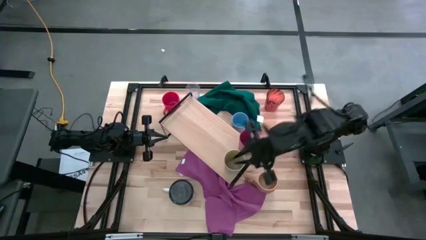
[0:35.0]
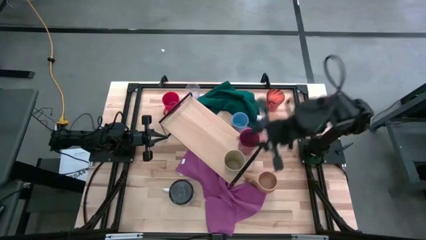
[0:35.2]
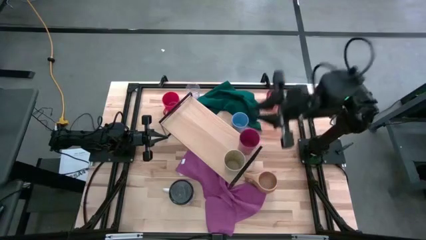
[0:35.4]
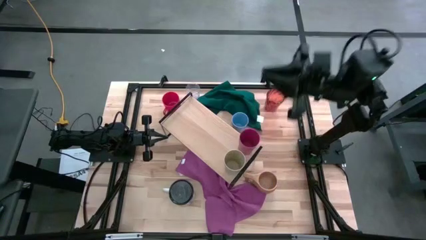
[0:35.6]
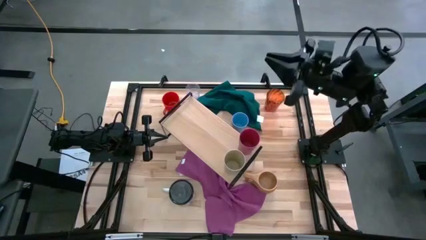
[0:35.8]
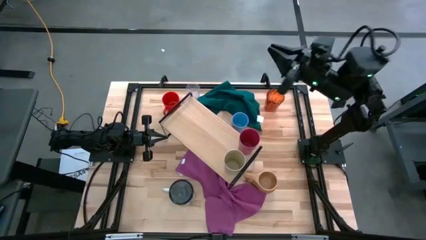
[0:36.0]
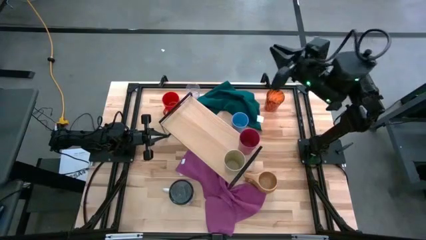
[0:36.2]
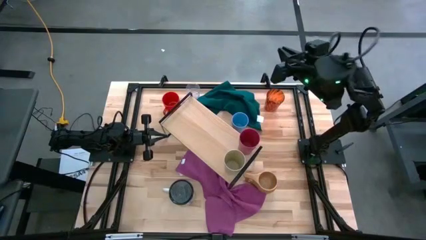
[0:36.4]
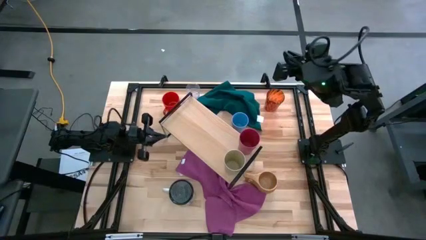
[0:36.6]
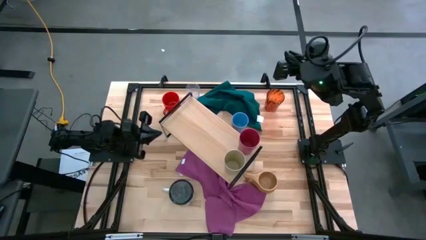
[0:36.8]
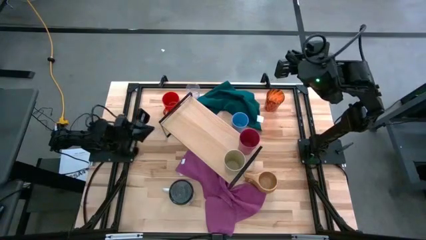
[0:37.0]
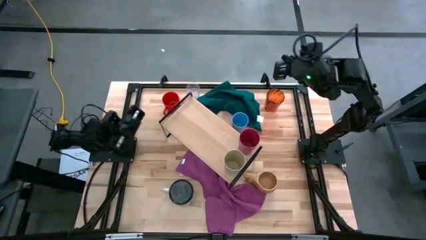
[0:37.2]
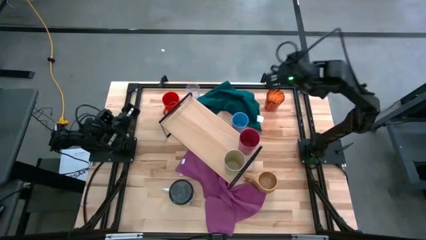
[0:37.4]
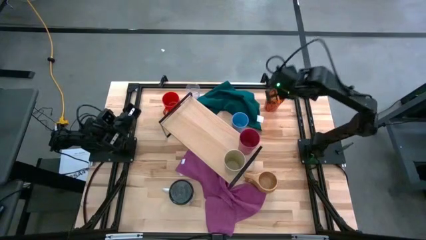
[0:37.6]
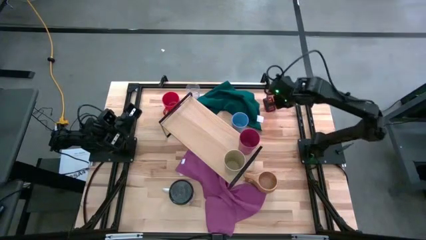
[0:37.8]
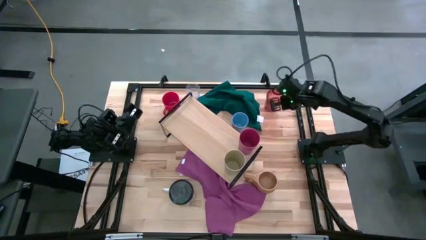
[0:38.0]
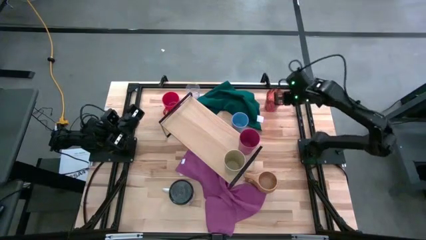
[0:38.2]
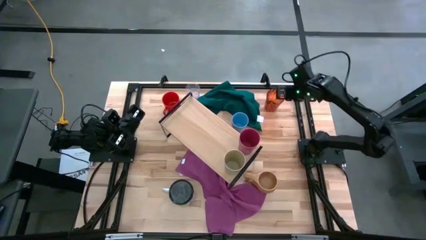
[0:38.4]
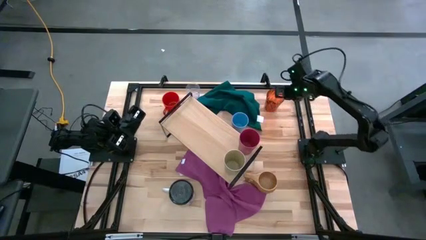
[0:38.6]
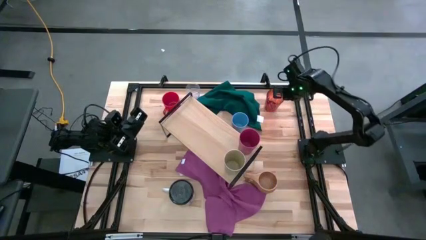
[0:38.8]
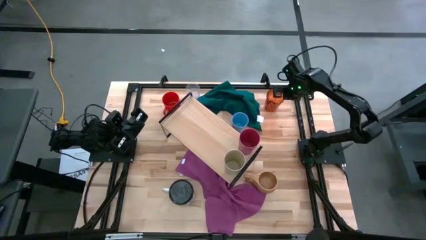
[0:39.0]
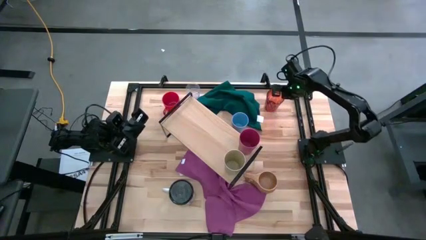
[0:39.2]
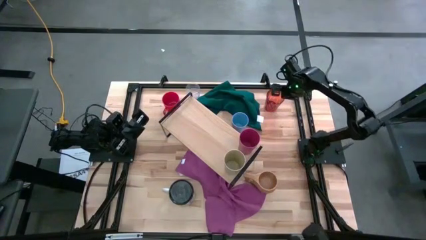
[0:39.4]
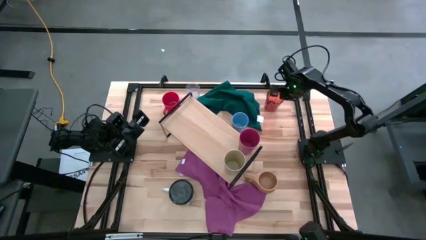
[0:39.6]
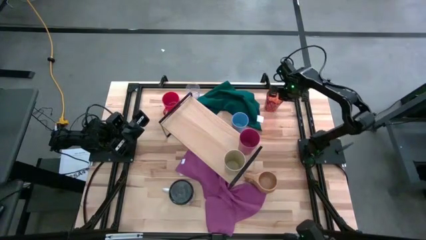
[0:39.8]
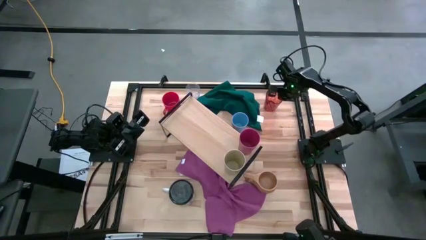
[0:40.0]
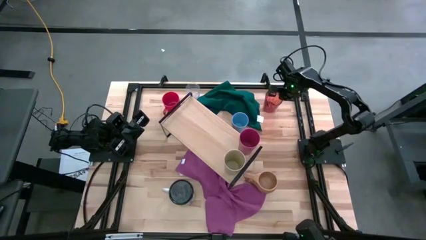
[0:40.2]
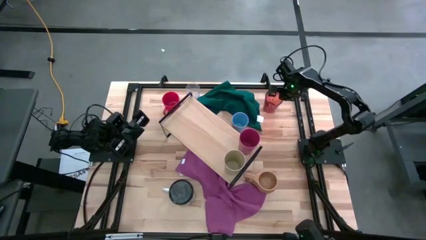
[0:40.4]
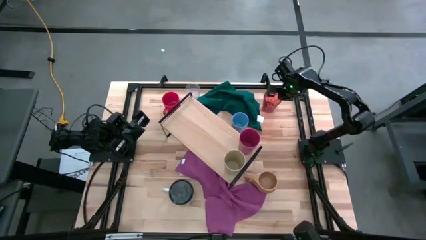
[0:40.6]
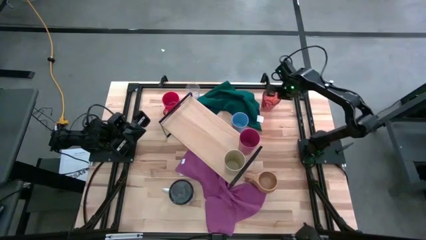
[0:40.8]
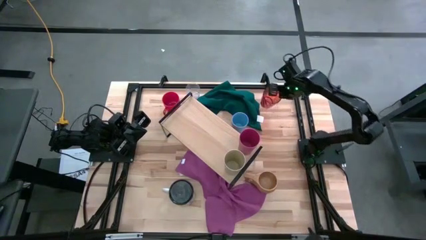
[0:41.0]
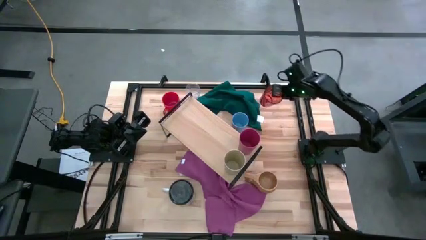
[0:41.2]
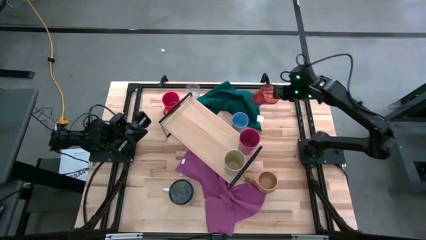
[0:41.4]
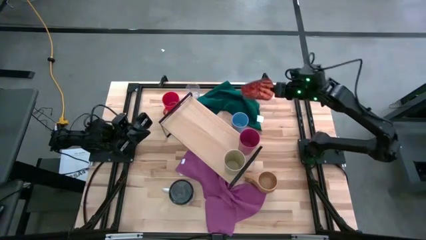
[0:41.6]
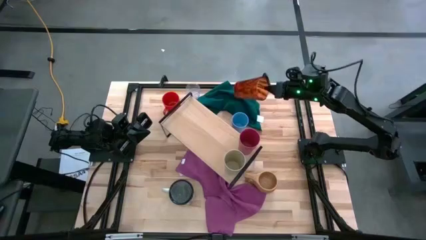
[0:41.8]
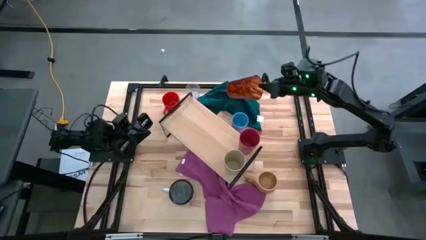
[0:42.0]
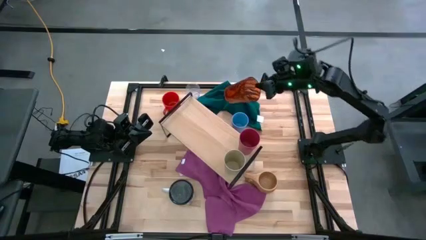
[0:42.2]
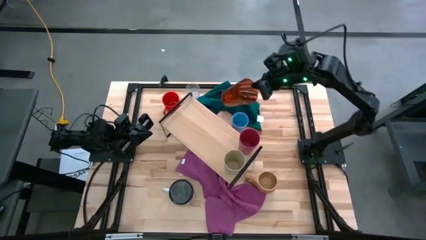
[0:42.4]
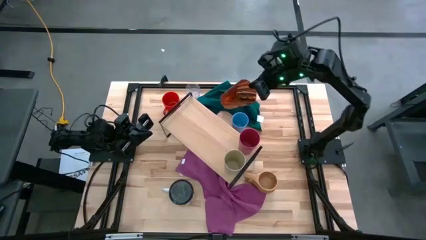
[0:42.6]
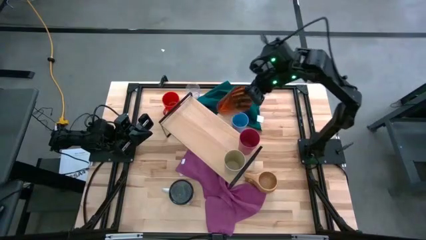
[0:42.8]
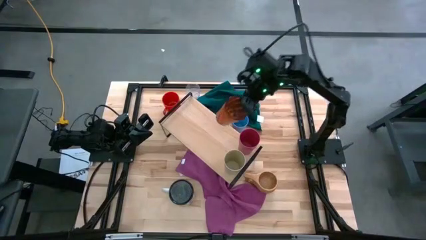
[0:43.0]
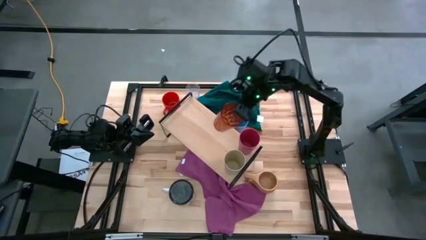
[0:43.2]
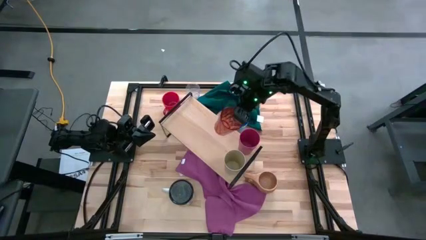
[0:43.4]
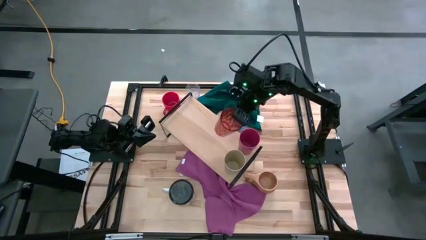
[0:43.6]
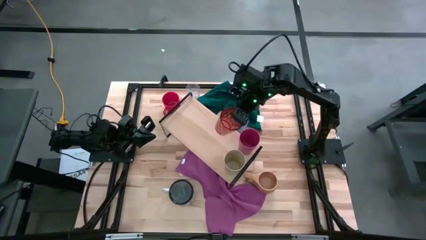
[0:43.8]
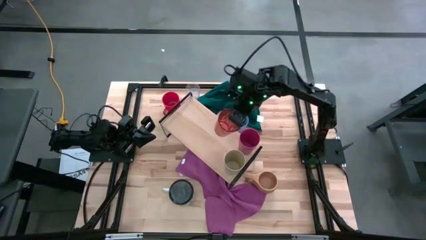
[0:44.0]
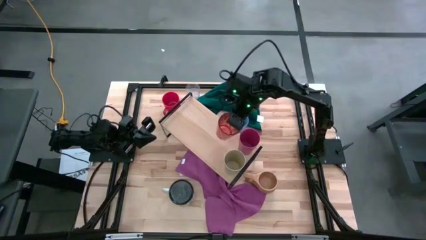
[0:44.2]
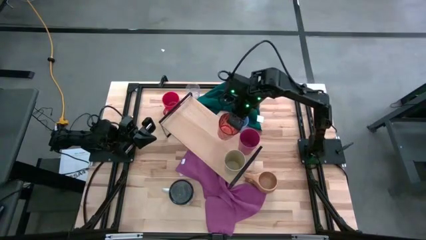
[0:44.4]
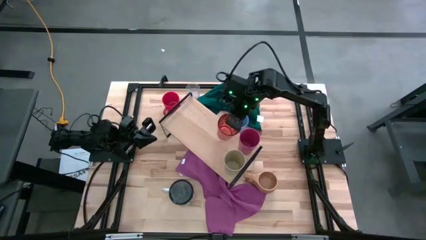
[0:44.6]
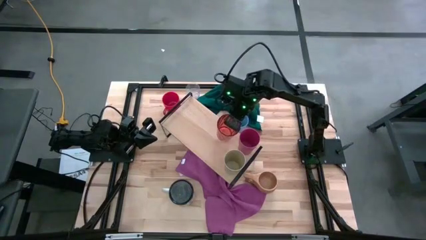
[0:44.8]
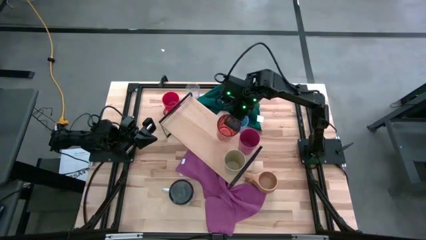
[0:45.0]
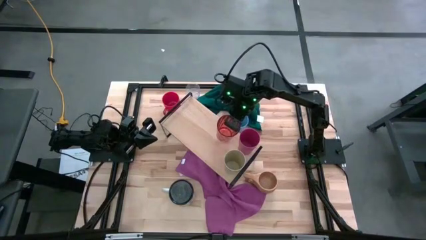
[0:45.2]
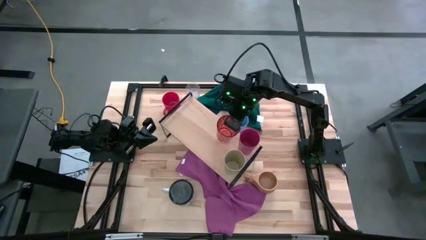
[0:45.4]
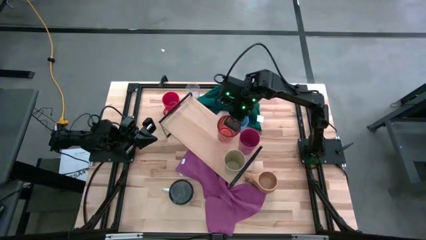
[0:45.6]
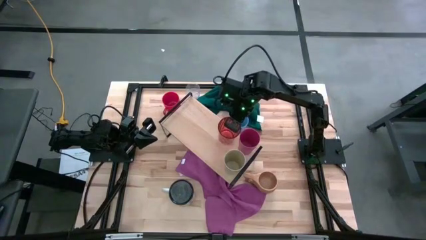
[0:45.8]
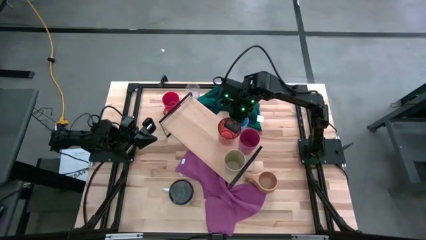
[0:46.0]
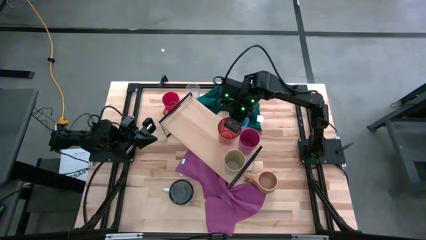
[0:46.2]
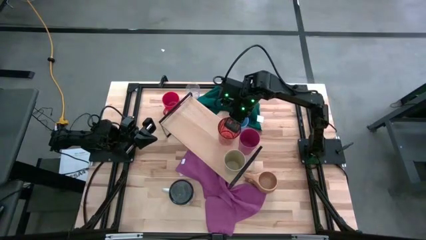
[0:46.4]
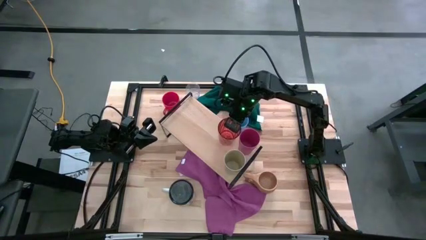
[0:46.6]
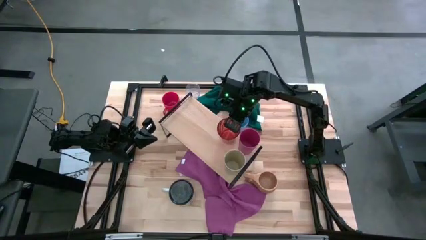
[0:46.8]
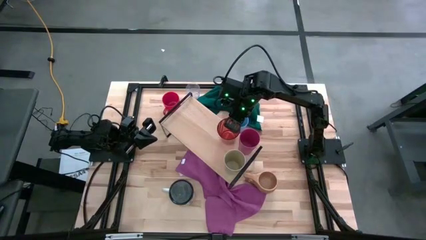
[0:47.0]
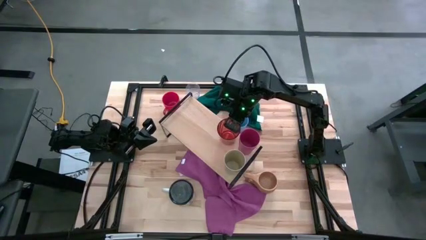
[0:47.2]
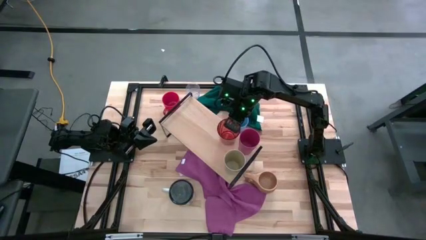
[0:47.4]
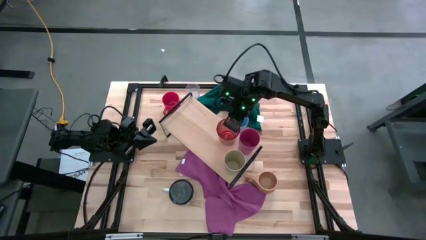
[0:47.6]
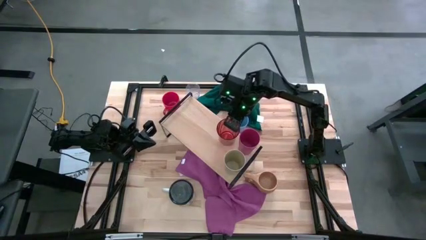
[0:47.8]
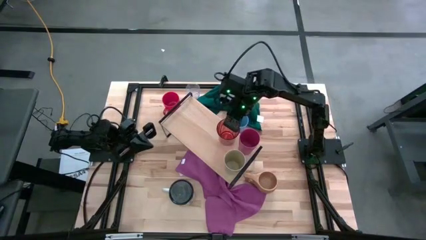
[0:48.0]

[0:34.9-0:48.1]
Task: Stack small to large cups/mugs on shelf
Put the orange cup on the shelf

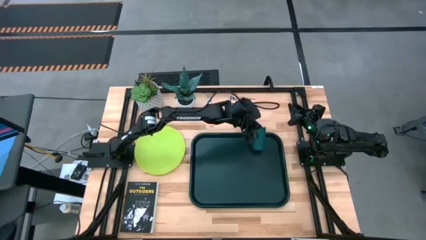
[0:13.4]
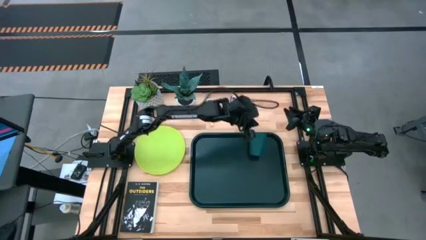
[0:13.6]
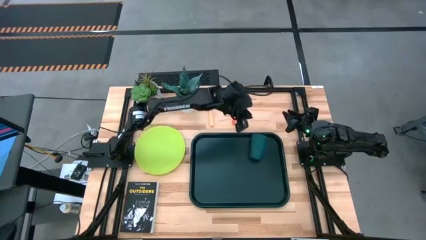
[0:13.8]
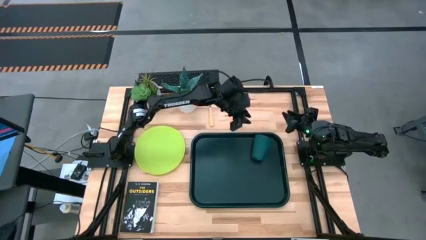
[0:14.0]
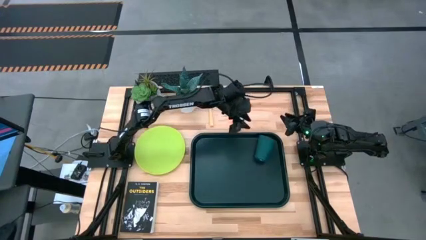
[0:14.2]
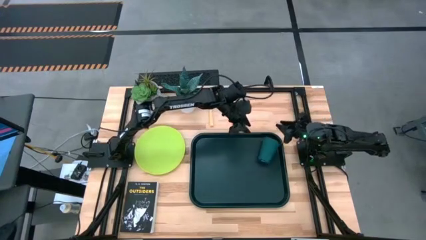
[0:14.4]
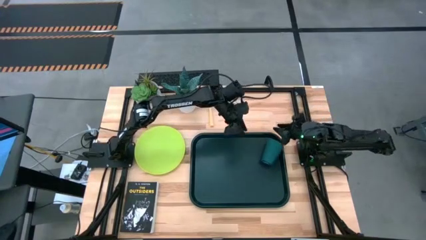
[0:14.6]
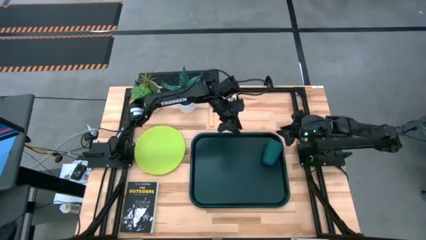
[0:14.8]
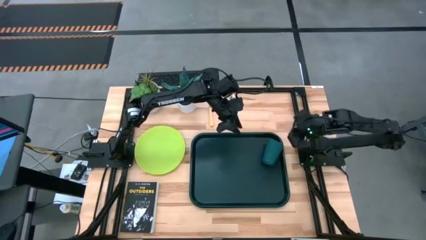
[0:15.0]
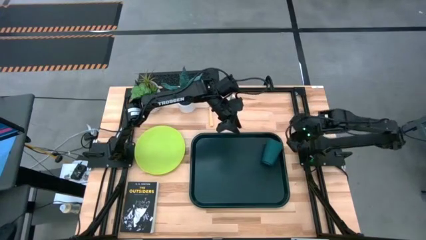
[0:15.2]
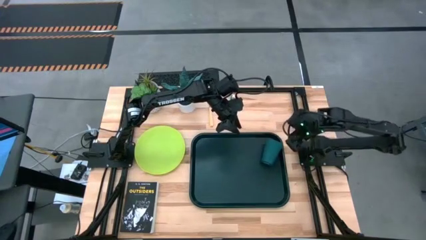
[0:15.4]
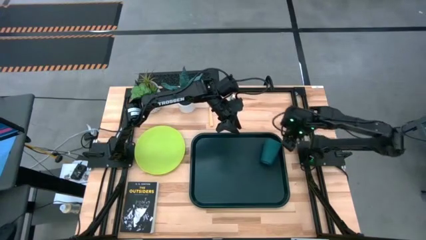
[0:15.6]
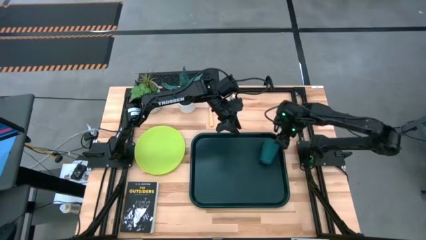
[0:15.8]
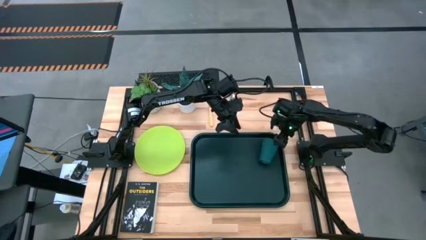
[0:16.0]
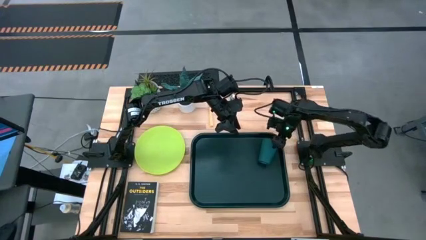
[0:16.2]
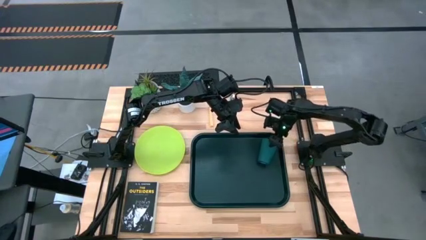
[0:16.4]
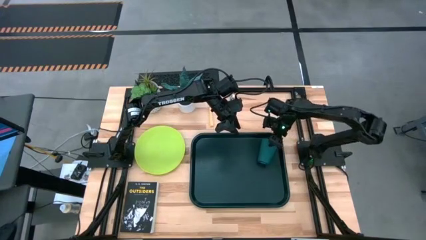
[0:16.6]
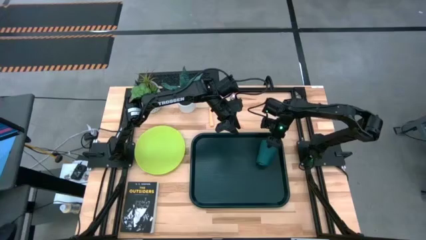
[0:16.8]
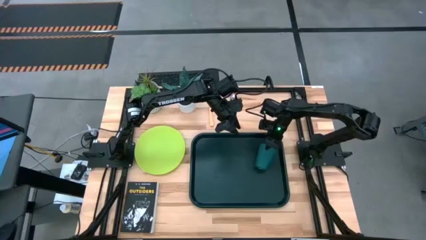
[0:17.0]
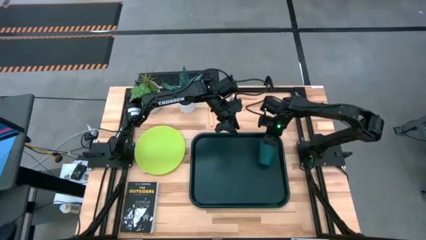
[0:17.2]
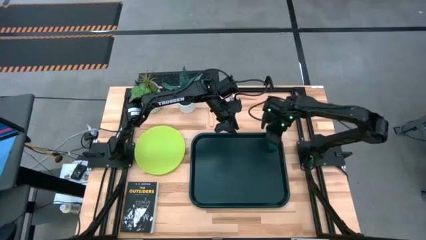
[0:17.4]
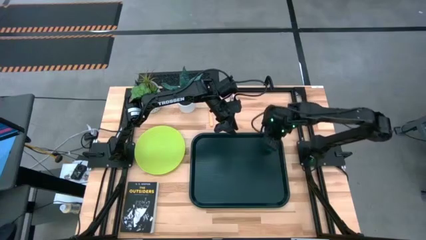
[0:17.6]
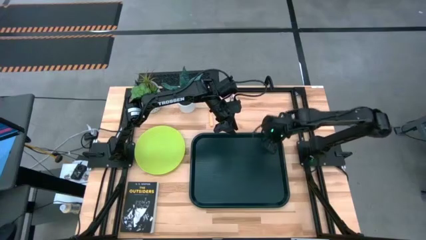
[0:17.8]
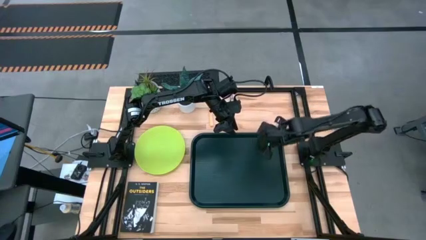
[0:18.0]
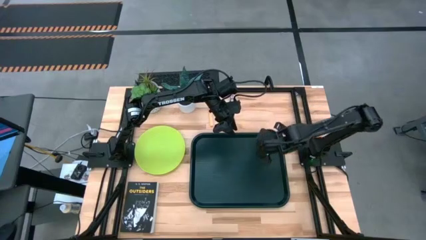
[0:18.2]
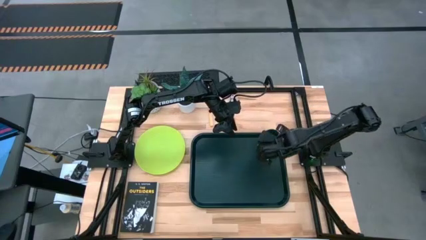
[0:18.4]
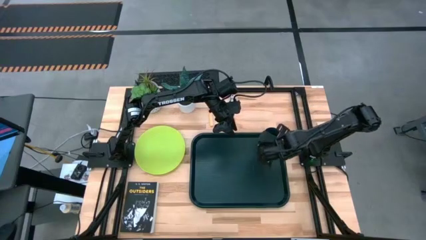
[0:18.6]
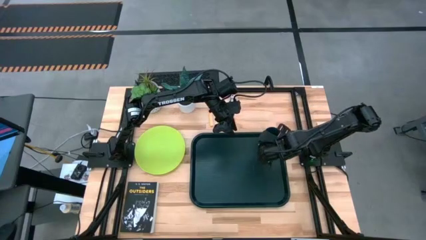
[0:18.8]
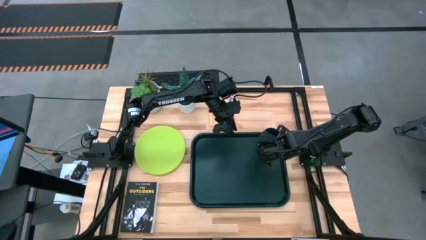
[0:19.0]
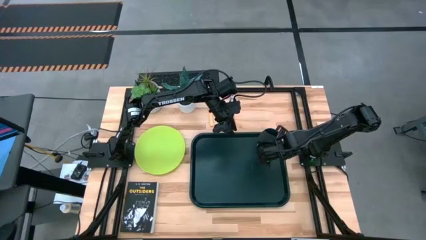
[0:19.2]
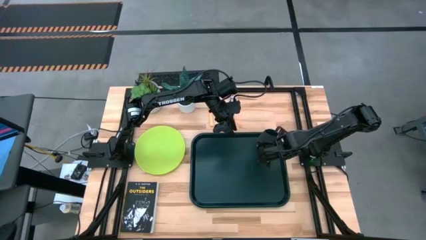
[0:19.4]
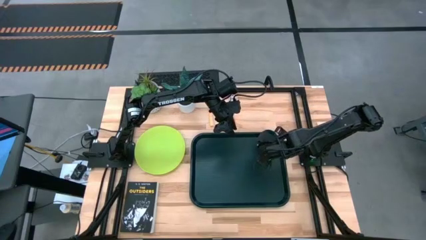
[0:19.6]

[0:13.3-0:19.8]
Task: Pick and place plate/cup/fork/spoon on tray
Put the green cup on the black tray
